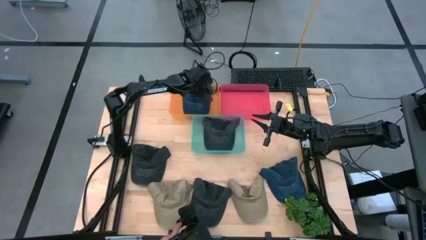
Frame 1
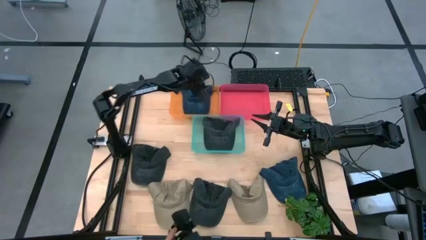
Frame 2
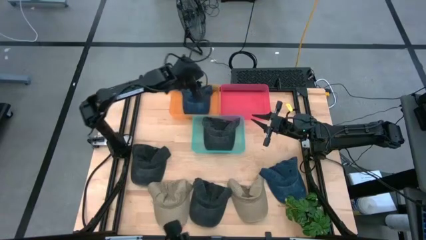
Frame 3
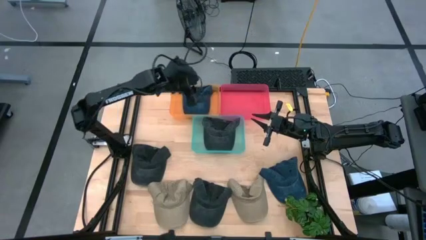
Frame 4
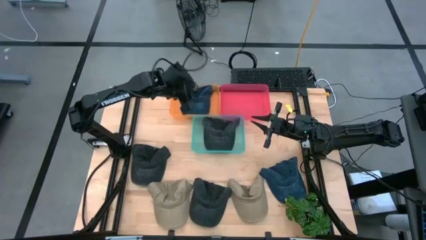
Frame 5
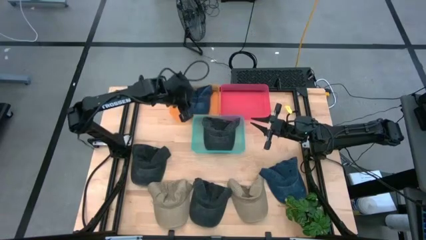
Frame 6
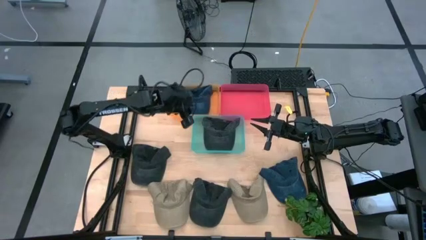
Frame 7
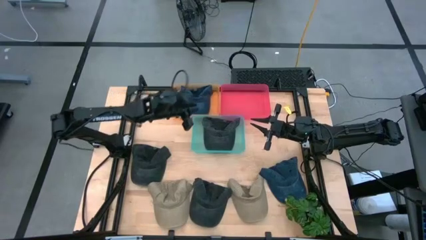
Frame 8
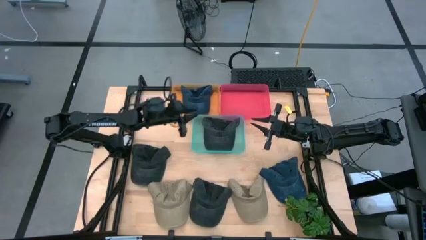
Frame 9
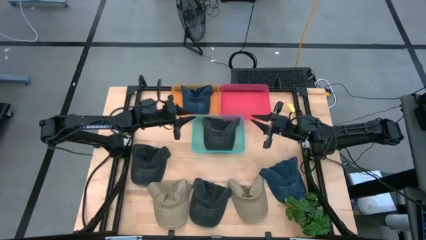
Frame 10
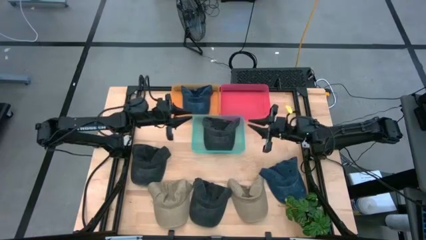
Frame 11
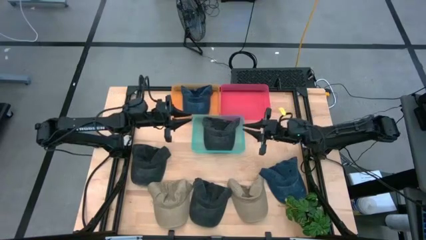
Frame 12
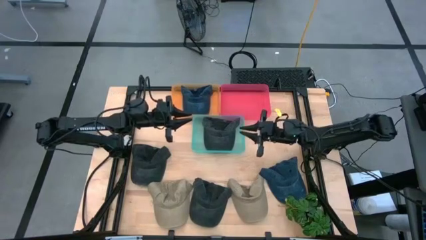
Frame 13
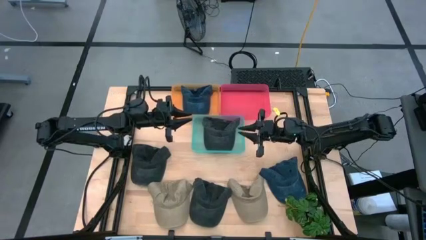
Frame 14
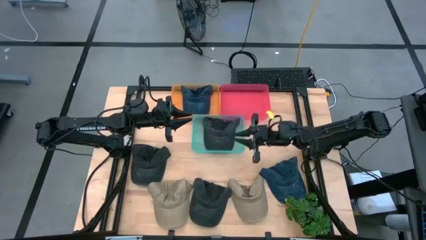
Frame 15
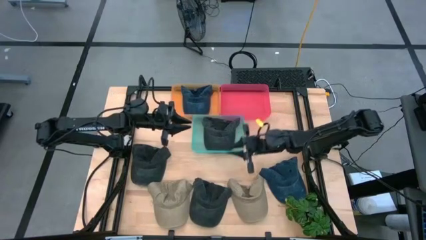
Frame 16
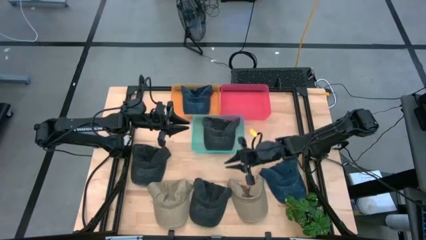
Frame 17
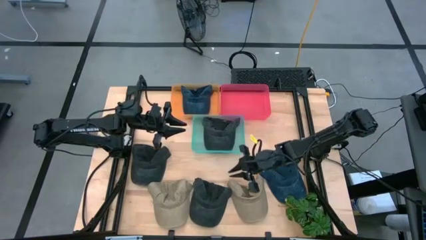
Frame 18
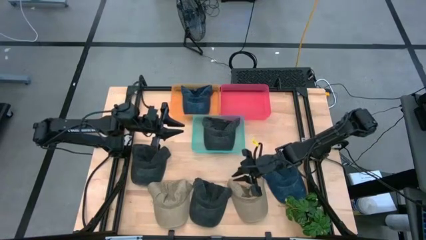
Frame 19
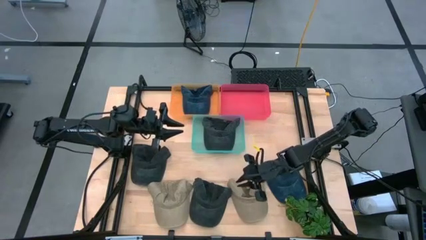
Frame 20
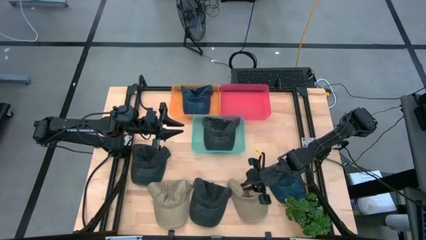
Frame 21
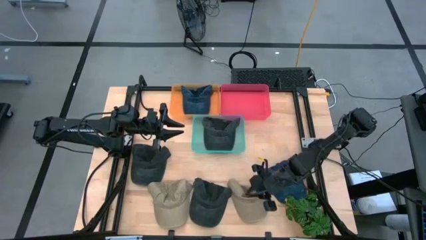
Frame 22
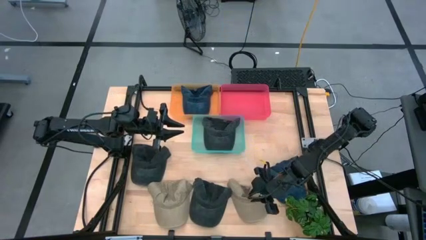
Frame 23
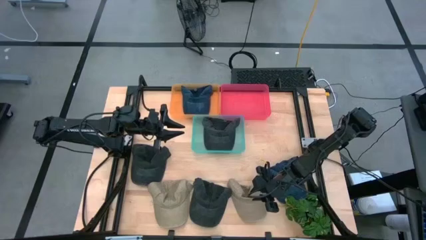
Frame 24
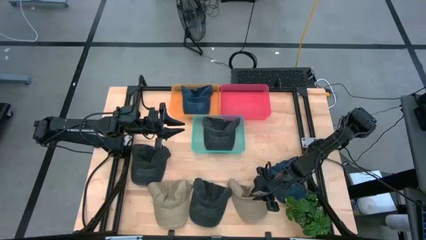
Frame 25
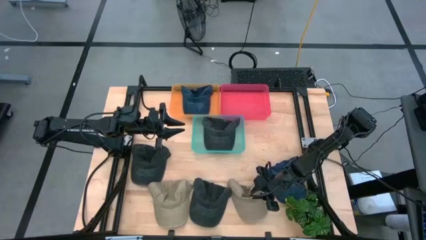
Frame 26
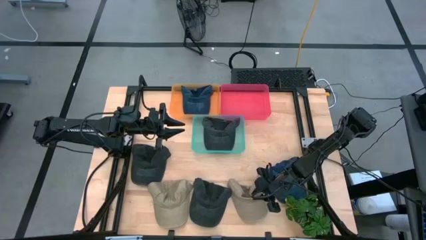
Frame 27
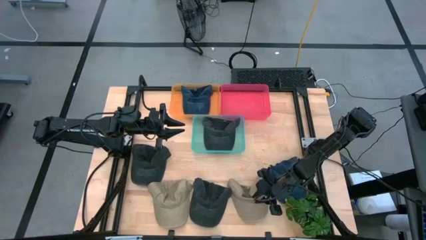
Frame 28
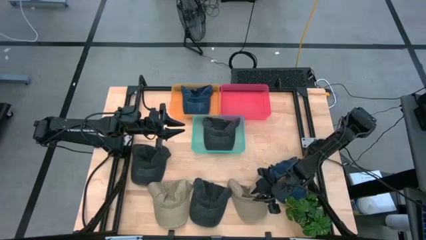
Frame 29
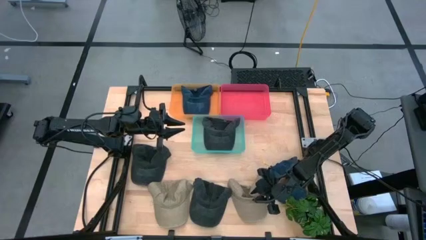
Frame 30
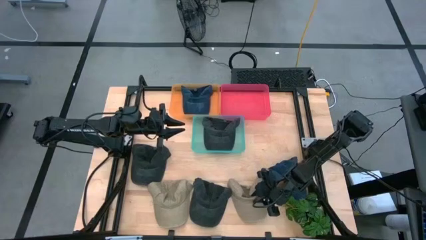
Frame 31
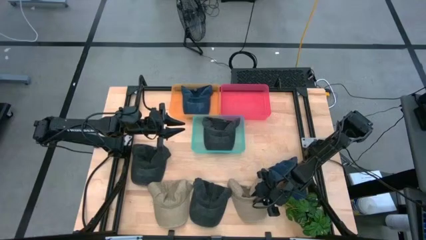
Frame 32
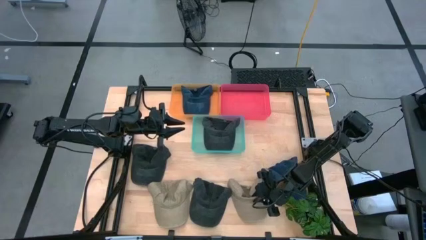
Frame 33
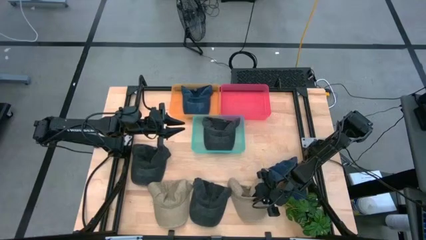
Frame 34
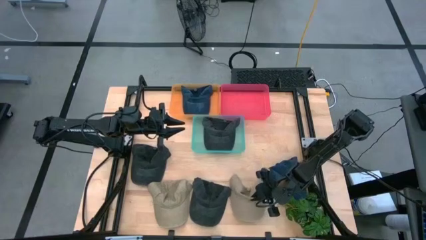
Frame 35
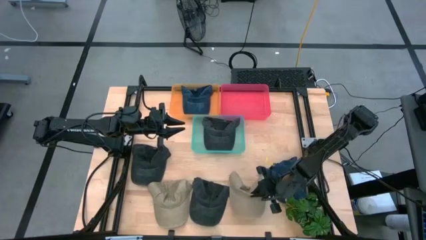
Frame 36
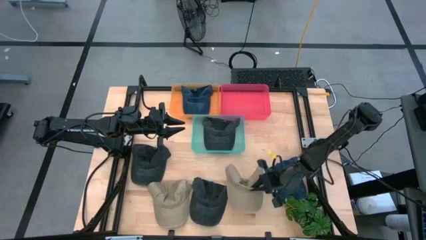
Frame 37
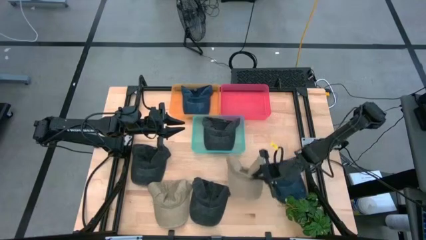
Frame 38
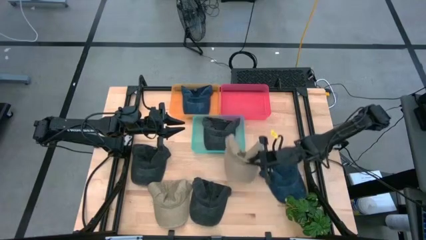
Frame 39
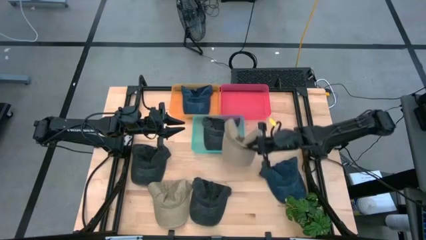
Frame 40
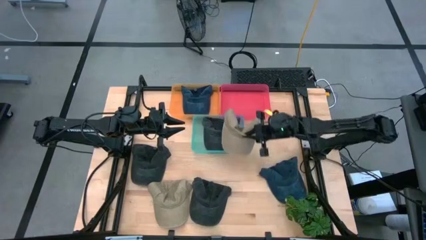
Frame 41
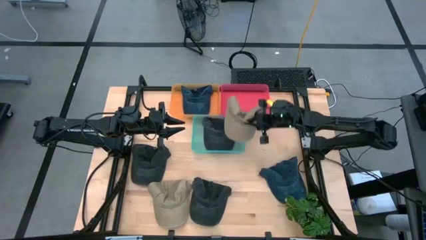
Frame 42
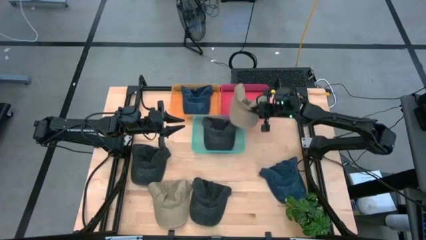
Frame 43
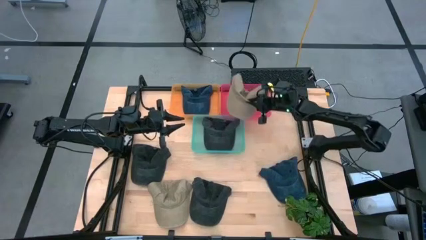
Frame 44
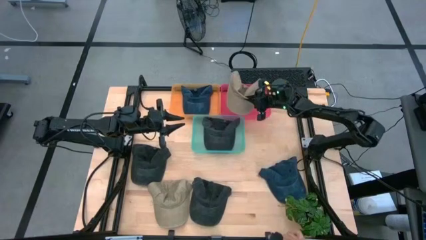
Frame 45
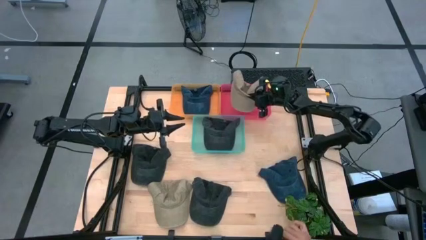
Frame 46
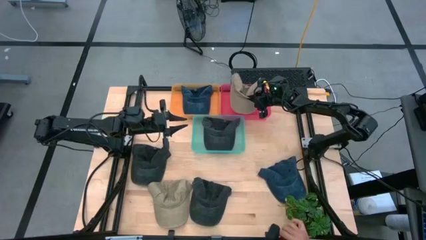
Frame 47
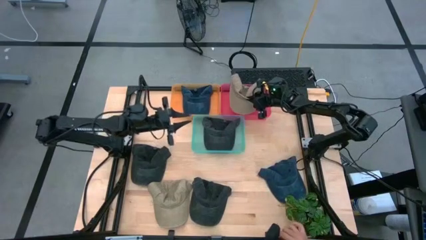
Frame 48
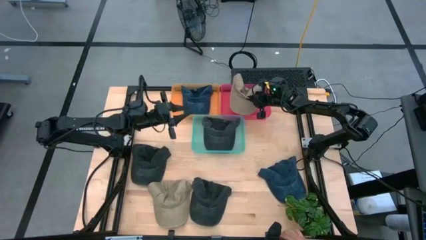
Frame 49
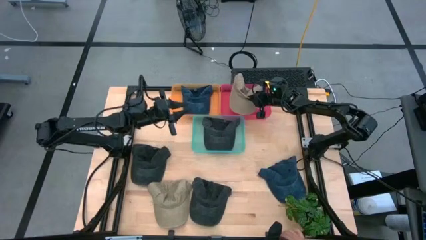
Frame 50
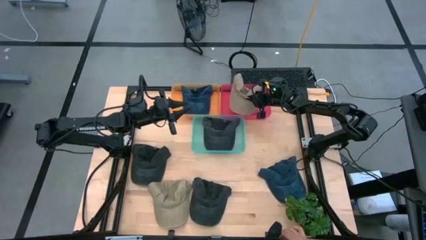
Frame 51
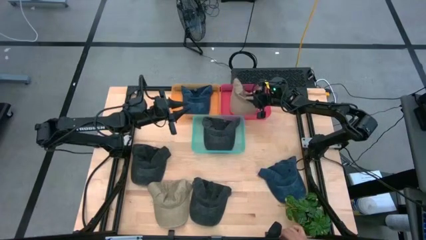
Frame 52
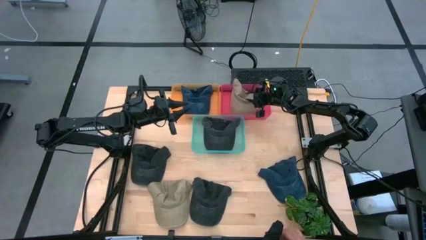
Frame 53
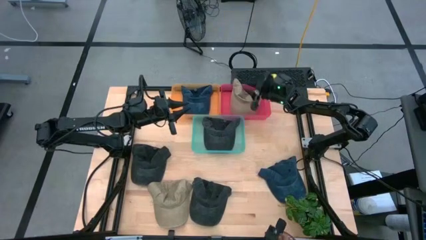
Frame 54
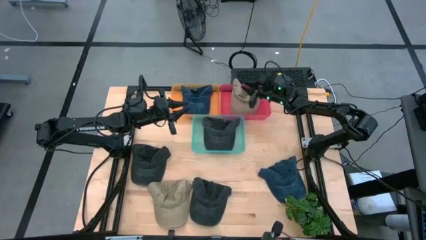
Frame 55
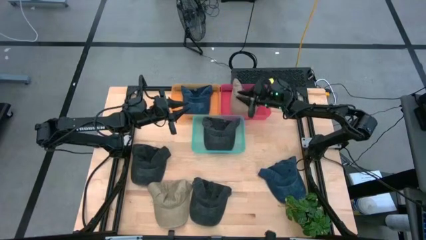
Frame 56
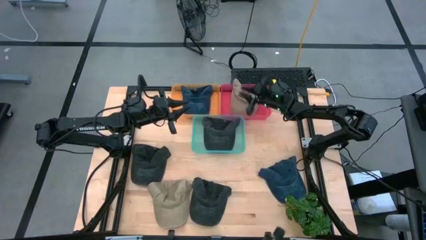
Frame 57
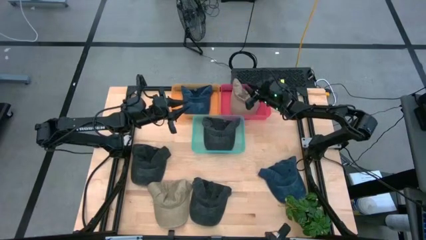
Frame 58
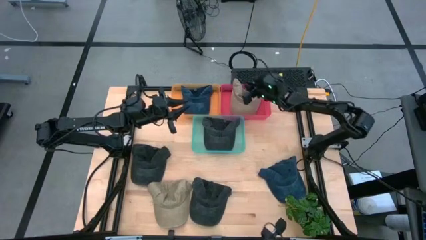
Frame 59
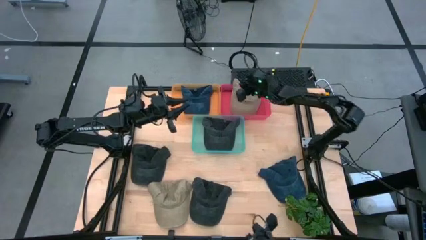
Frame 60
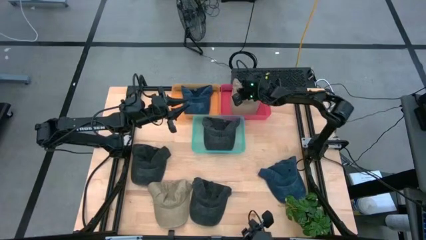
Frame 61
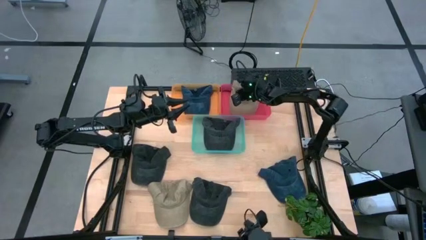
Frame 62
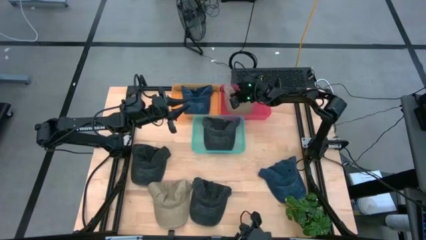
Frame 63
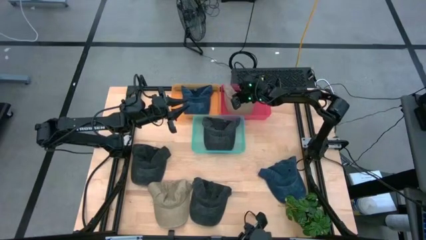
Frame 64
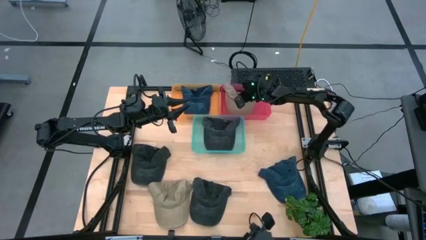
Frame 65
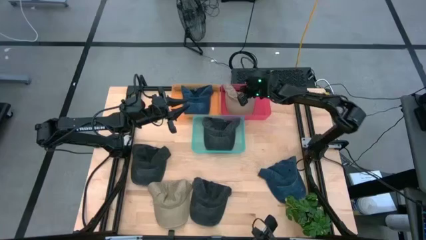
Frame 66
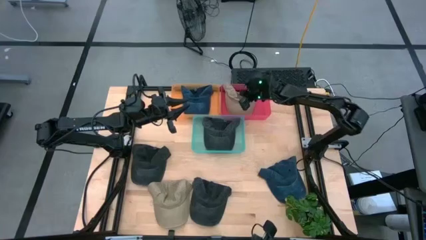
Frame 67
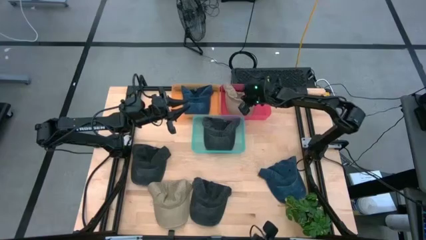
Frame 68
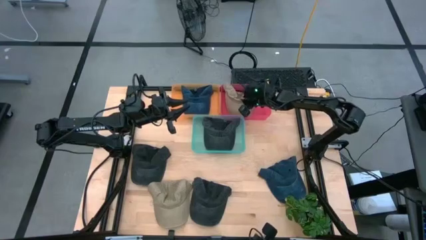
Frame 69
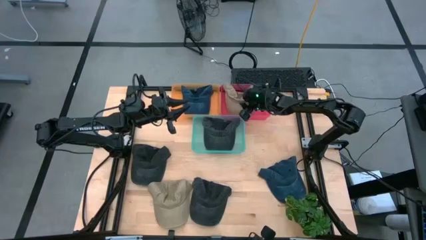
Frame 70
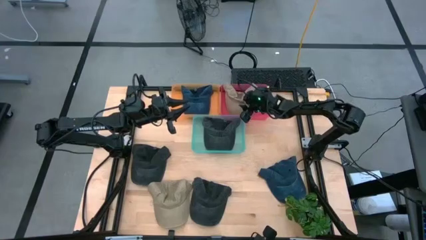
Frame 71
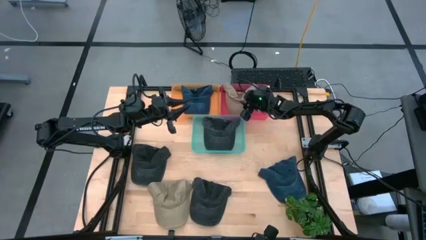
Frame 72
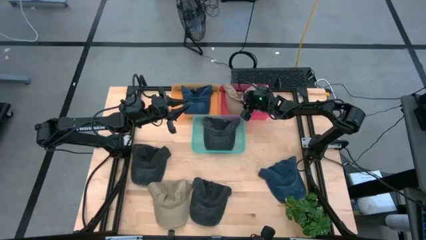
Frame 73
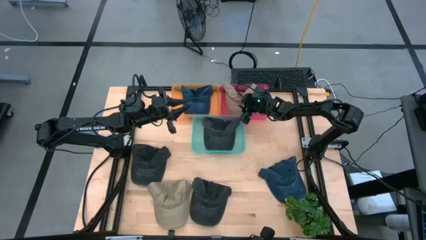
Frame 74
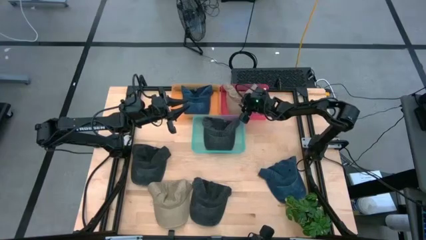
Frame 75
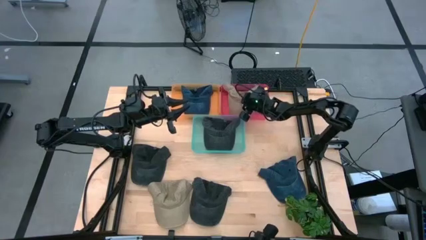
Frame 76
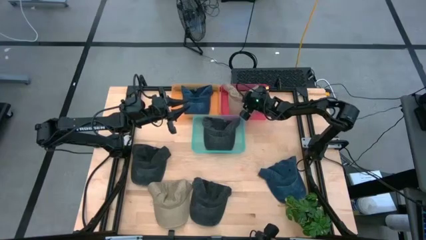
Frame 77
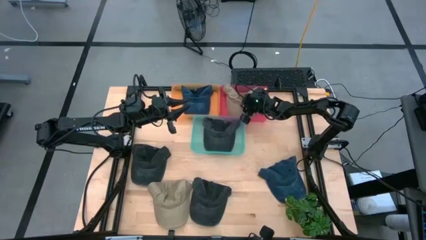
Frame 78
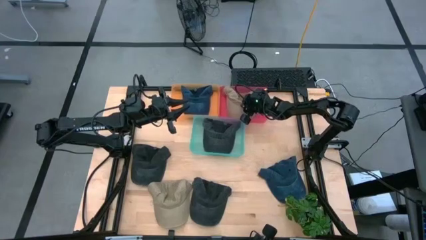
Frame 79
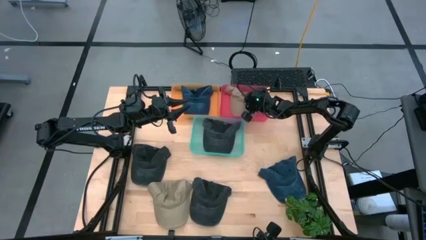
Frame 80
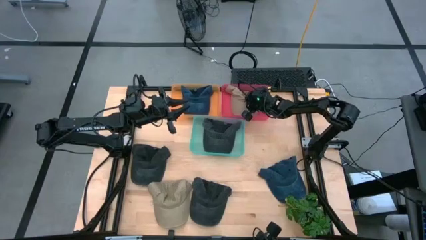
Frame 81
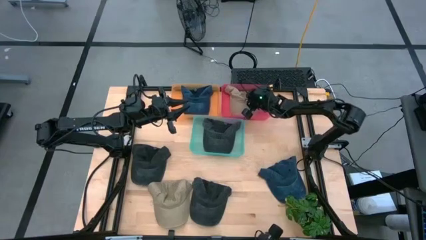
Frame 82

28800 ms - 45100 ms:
Task: Pick & Place hat
Put the right brown cap into the pink bin

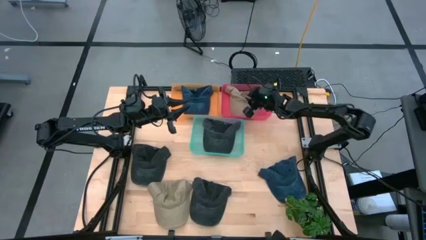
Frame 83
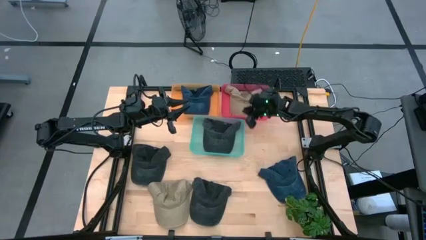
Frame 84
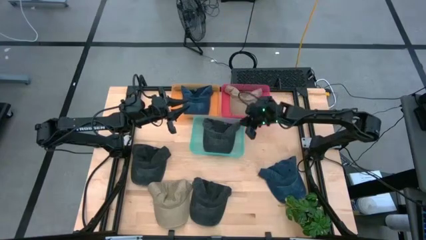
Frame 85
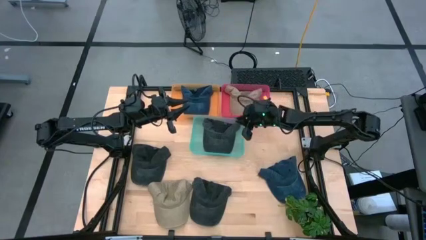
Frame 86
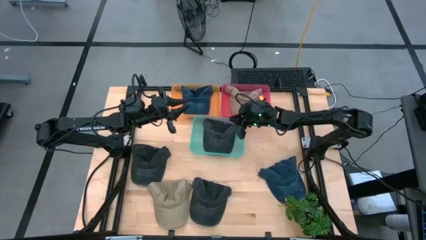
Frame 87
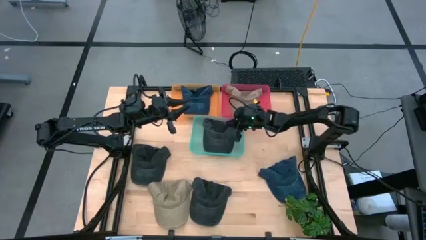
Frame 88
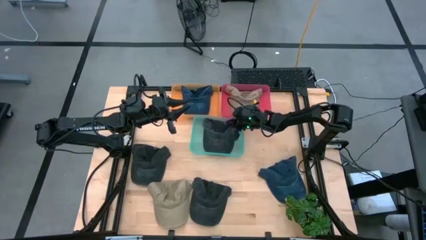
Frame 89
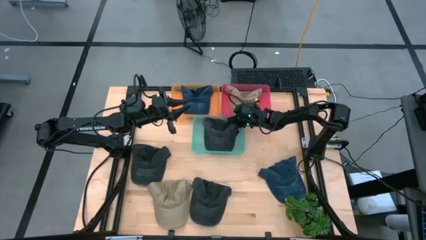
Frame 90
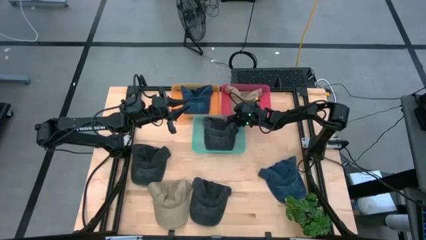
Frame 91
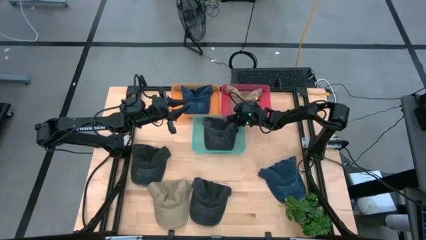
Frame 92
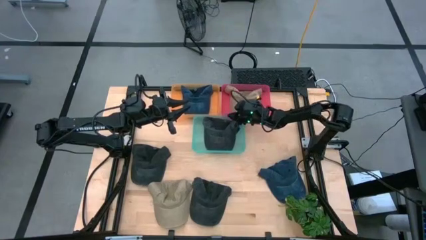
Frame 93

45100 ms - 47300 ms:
Adjust the blue bin
